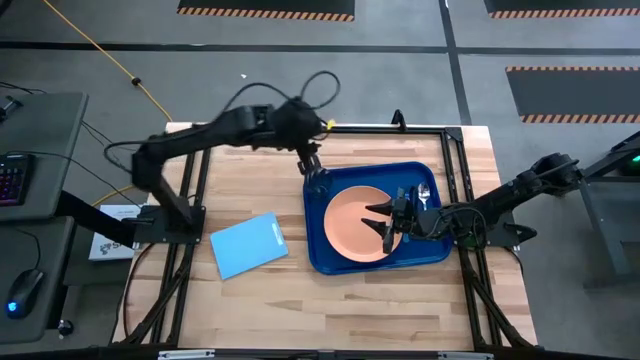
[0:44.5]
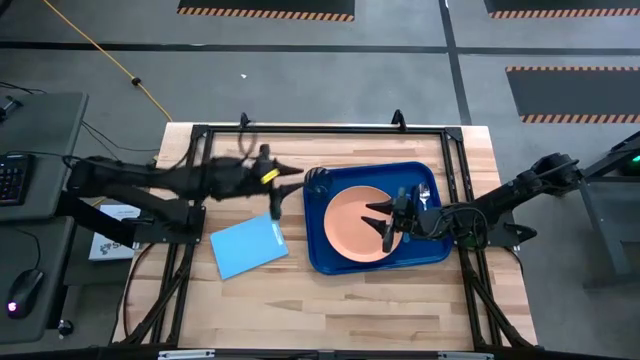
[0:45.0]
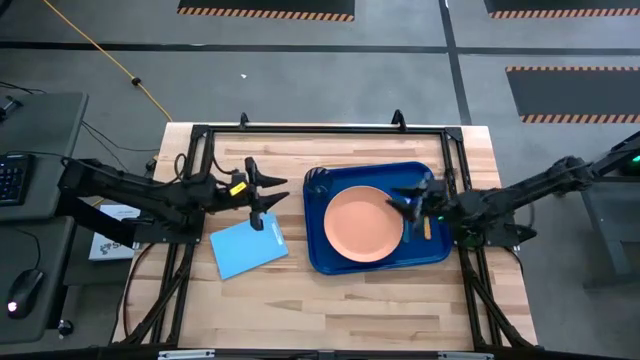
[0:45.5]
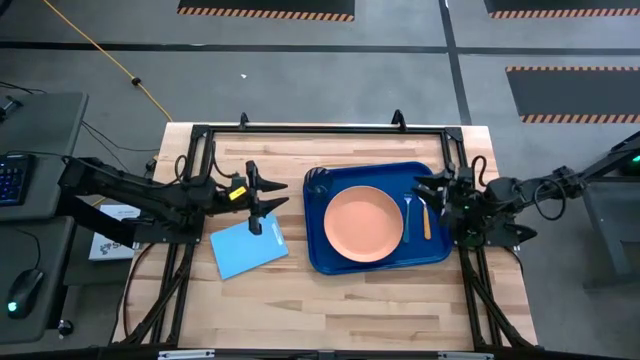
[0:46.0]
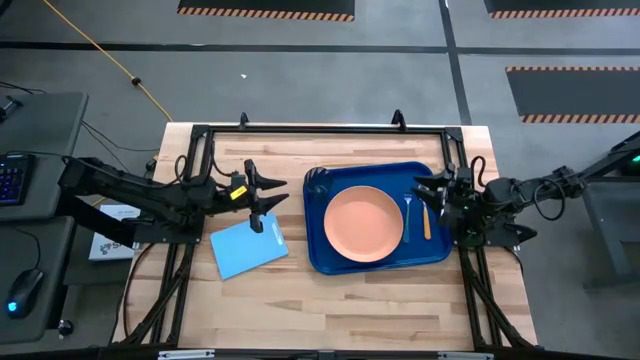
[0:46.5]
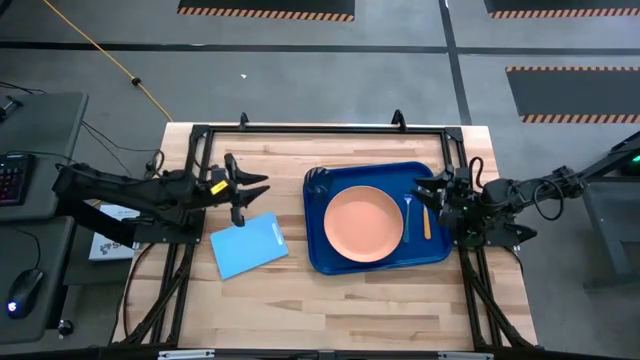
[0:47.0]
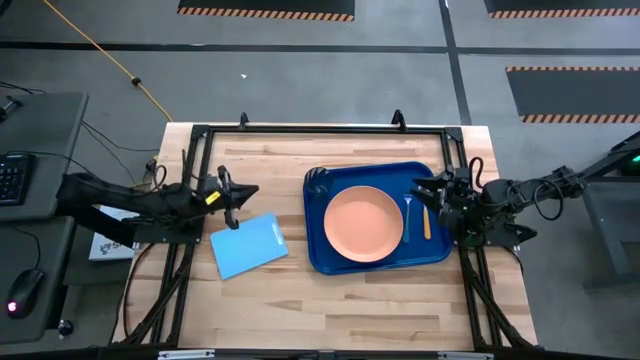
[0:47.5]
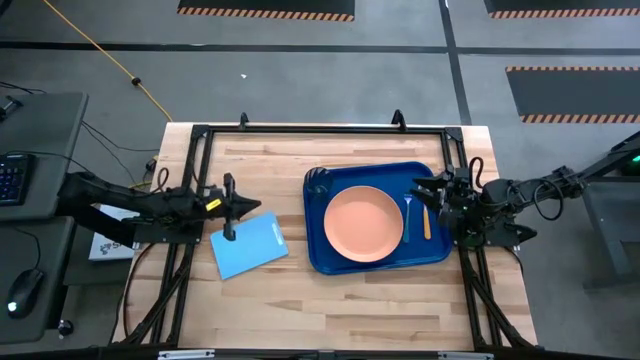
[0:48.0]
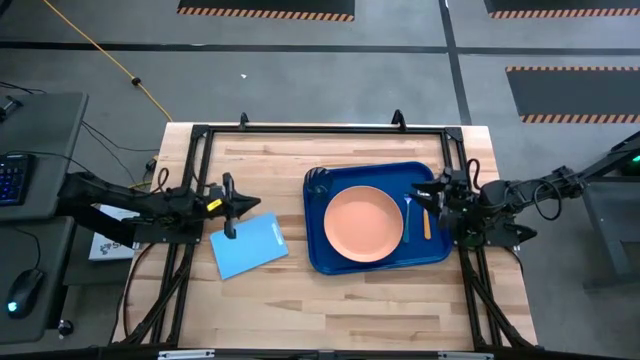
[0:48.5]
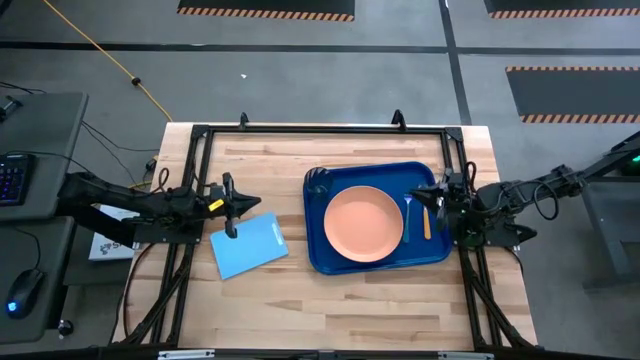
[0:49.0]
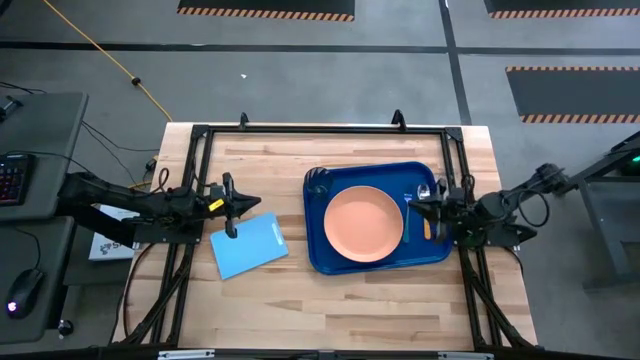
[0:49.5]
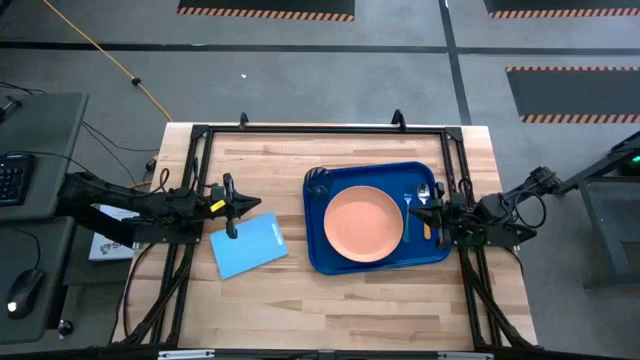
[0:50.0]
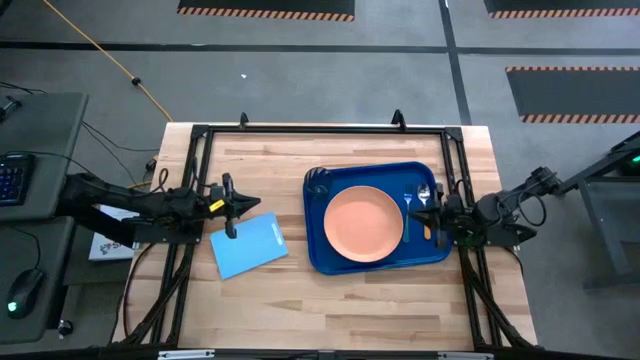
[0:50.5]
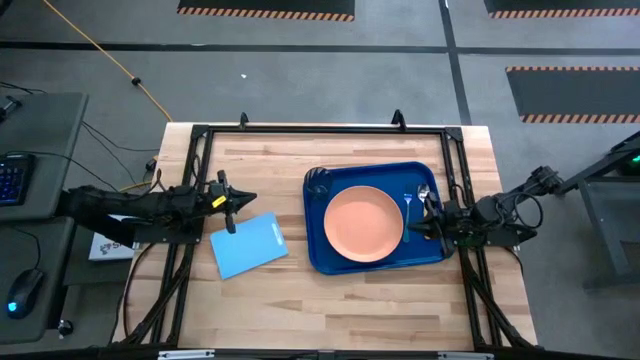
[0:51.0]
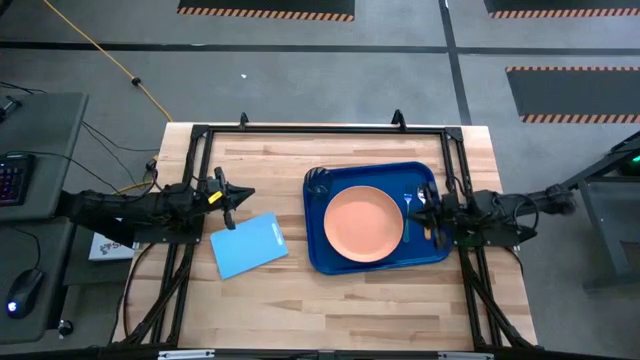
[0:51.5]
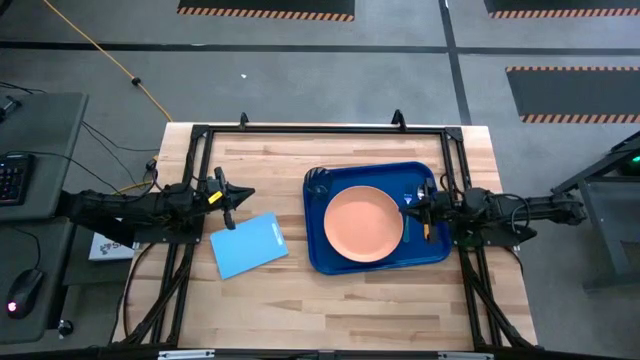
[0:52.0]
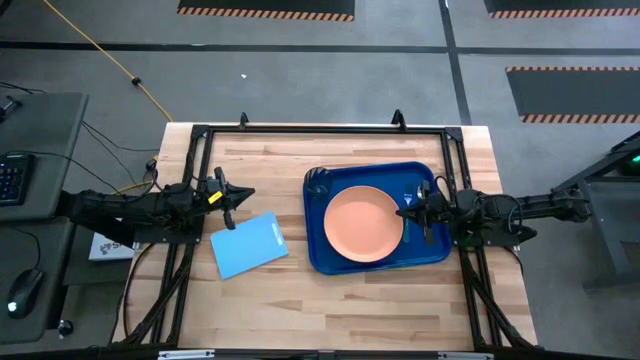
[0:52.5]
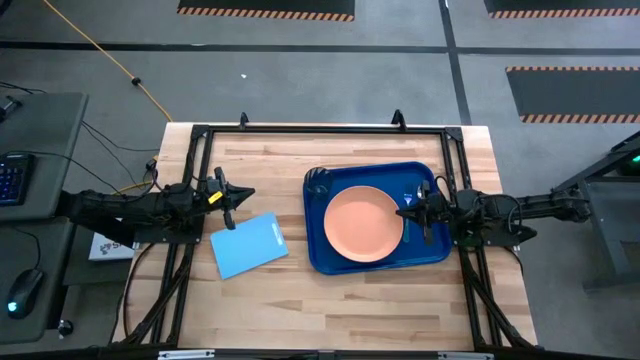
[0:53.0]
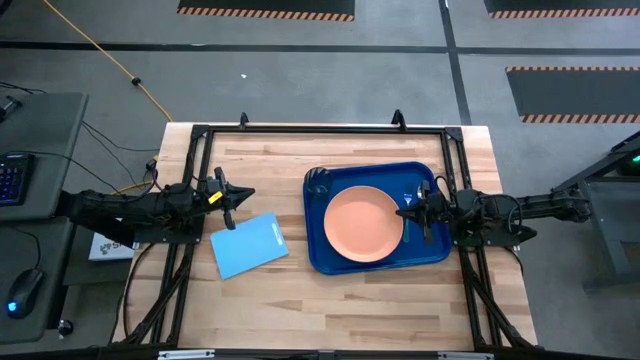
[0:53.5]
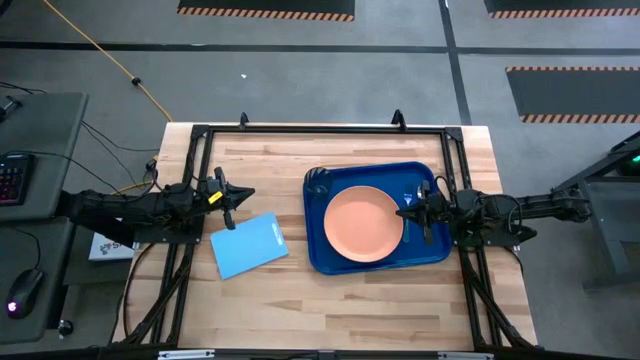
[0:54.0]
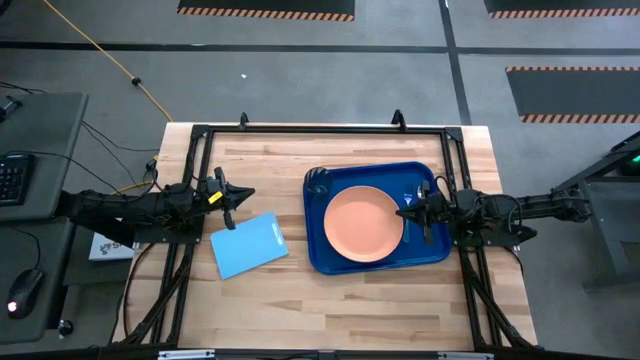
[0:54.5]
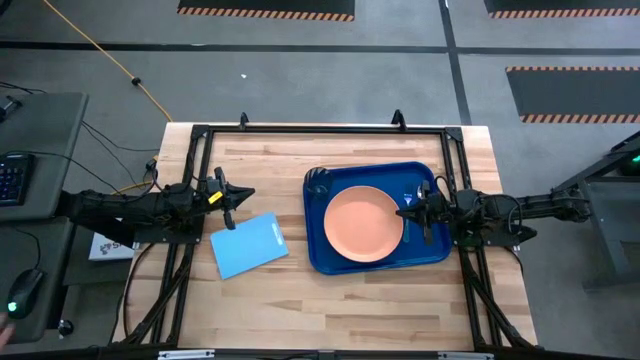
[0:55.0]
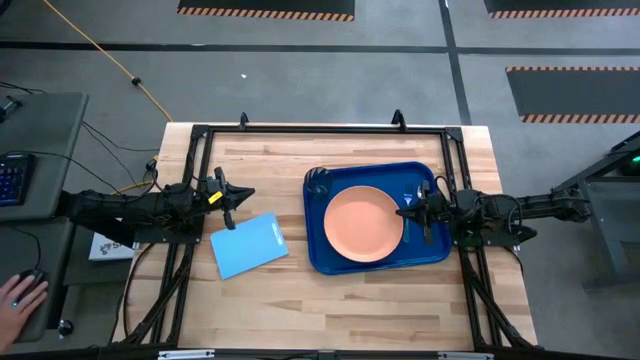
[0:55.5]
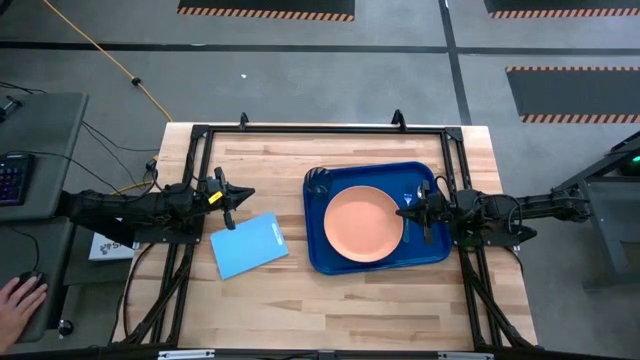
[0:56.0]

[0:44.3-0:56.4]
Task: Pick and place plate/cup/fork/spoon on tray
Return to Home Position

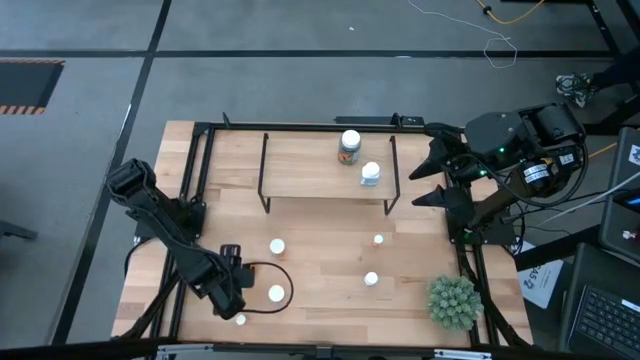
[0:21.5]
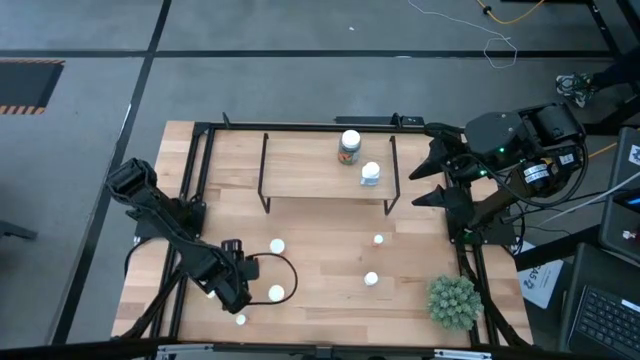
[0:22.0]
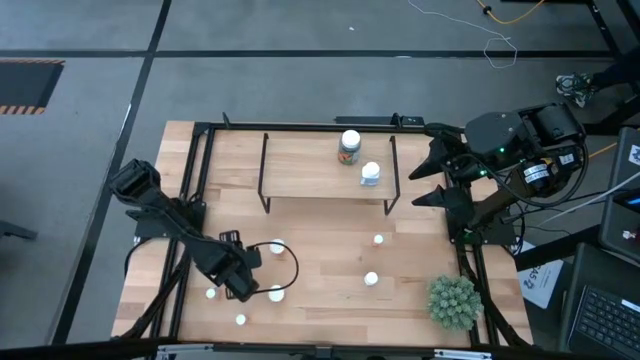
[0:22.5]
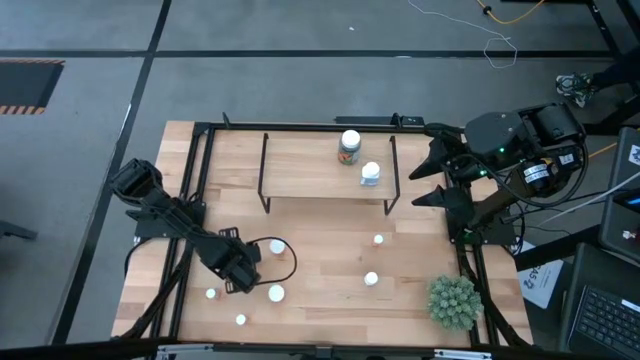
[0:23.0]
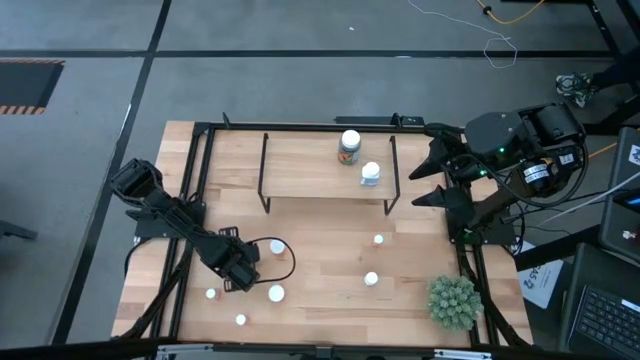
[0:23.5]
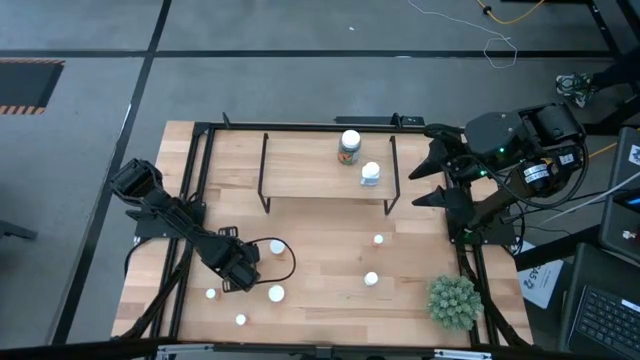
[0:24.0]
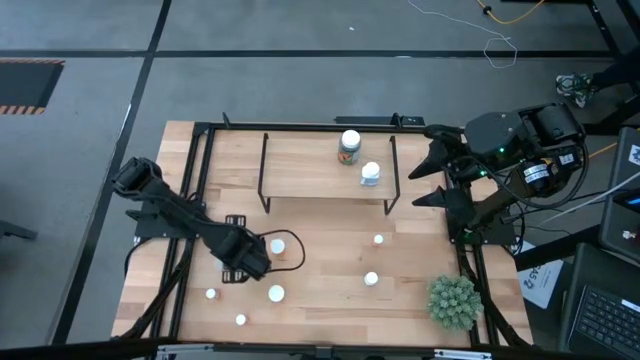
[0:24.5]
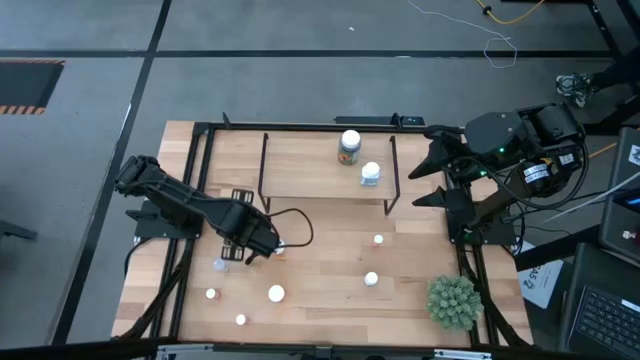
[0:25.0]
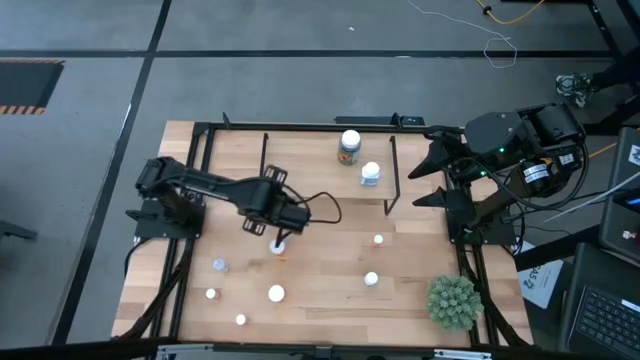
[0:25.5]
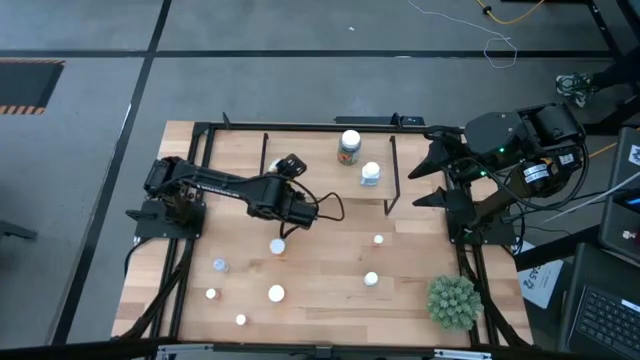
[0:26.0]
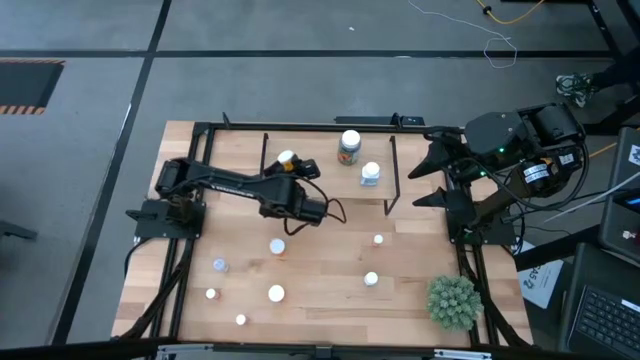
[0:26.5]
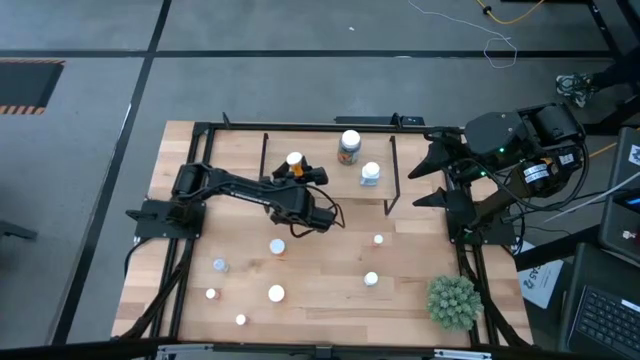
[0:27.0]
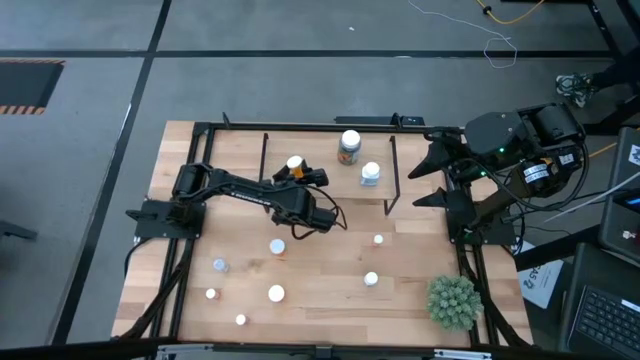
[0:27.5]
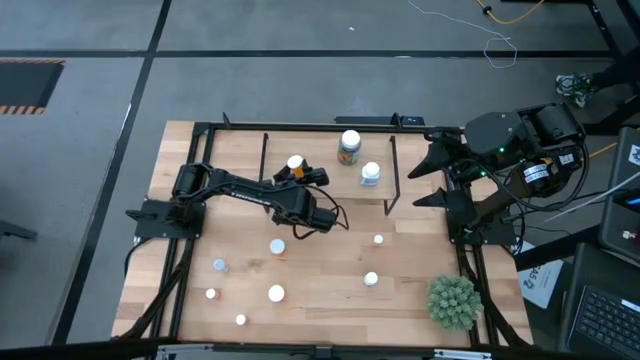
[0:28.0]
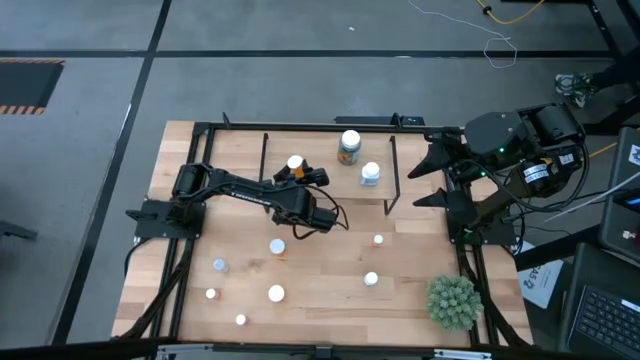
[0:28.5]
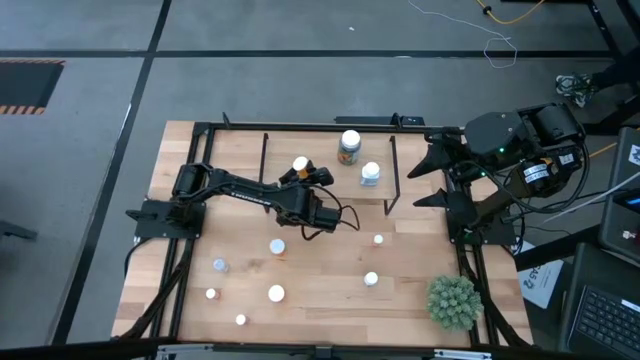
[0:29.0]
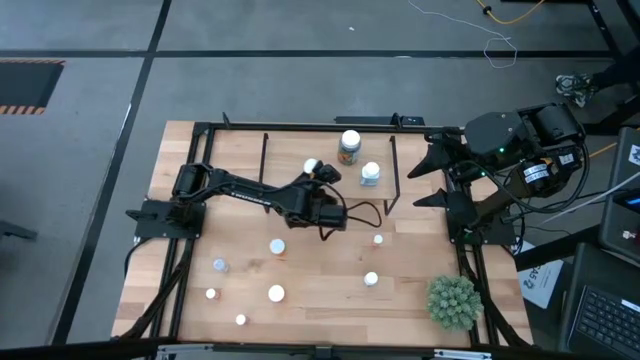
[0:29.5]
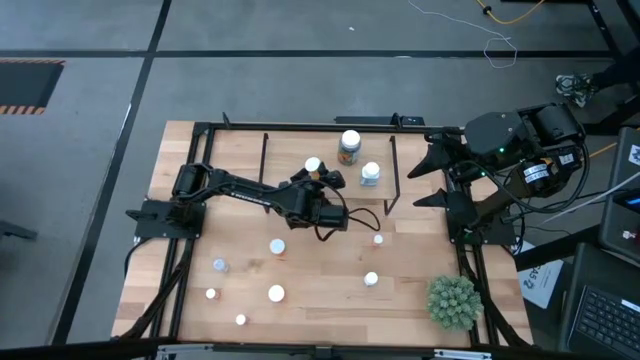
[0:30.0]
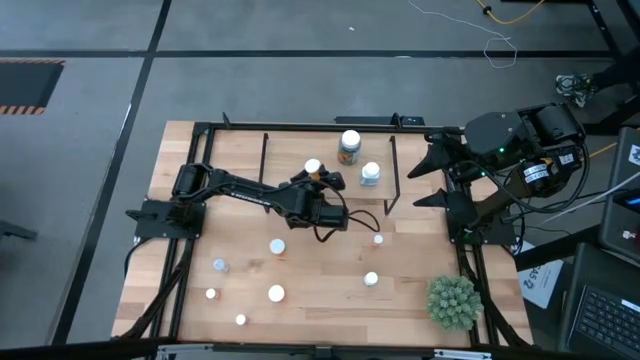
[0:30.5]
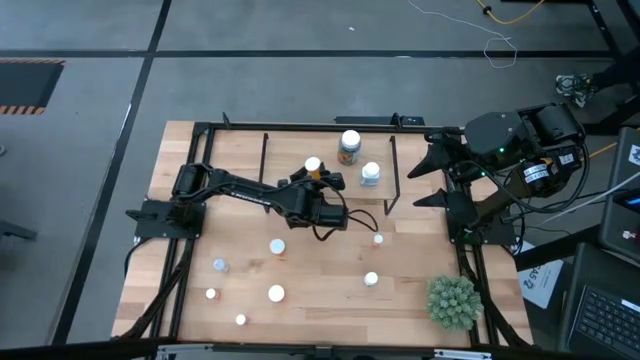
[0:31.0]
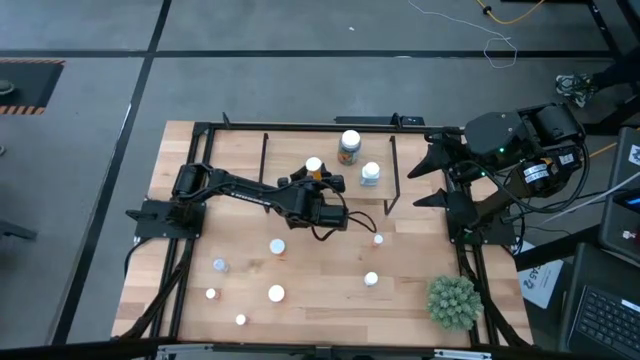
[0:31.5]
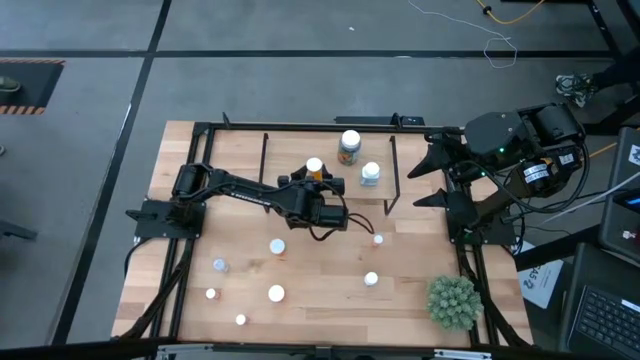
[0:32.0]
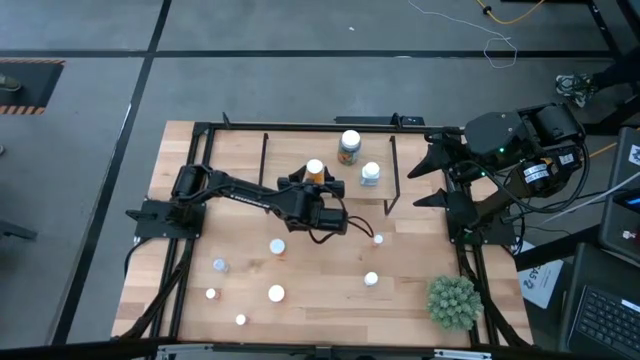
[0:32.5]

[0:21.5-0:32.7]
Task: Pick and place medicine bottles onto shelf by color
Put the top left orange pill bottle on the shelf
